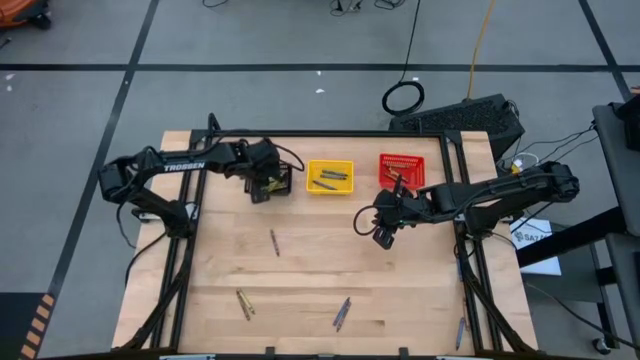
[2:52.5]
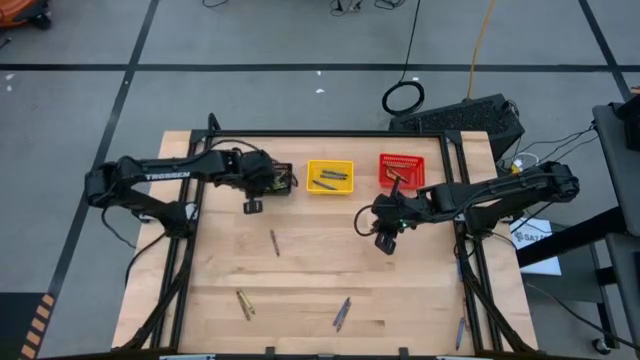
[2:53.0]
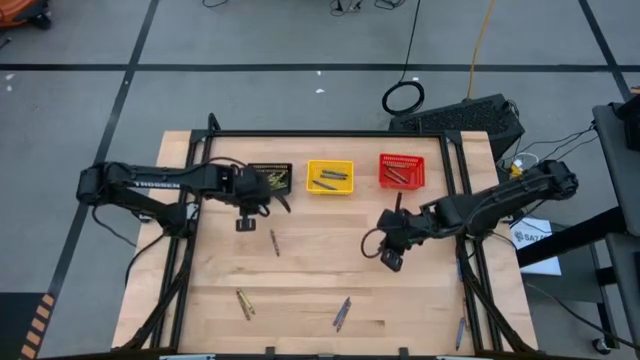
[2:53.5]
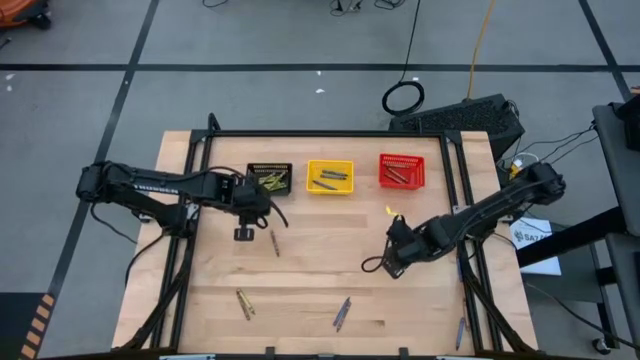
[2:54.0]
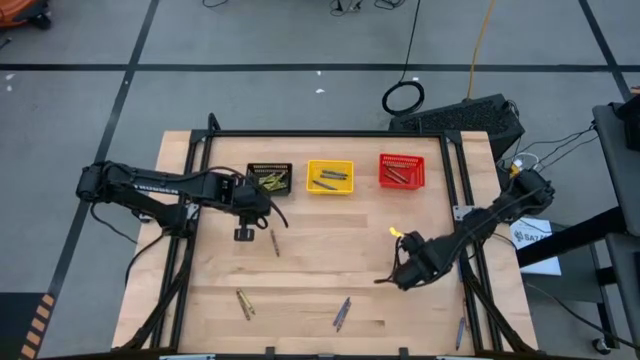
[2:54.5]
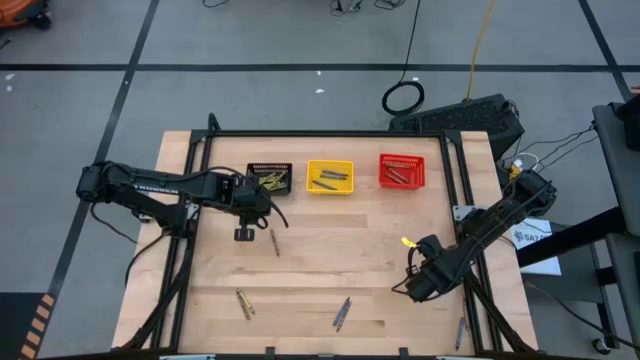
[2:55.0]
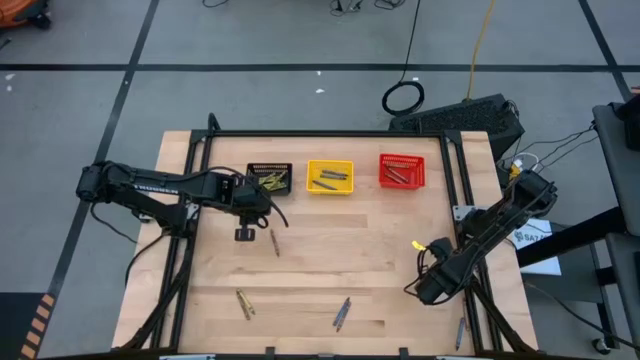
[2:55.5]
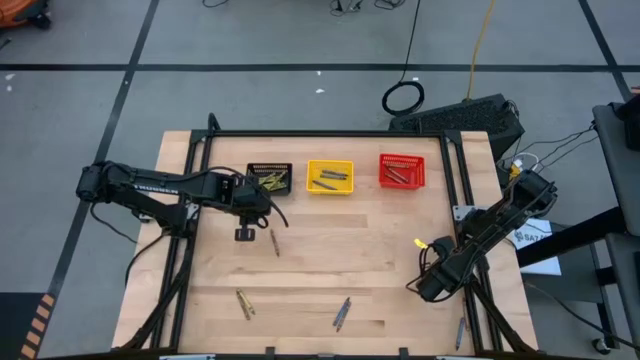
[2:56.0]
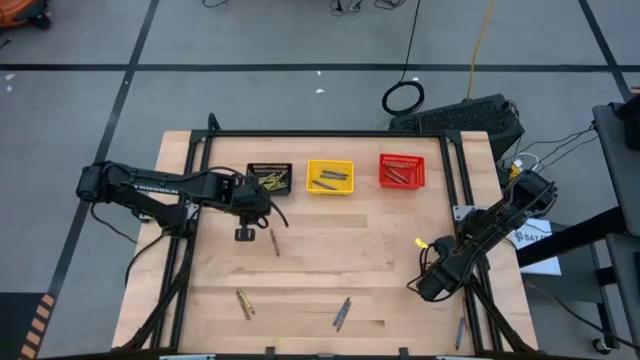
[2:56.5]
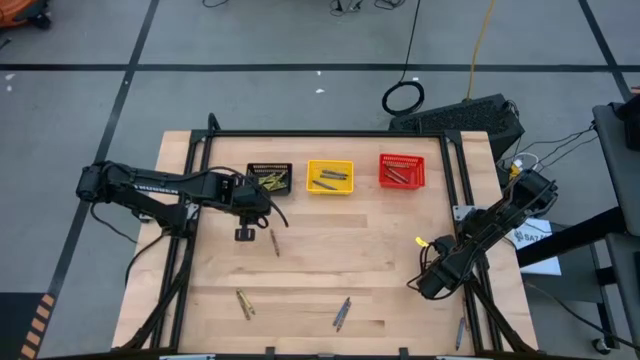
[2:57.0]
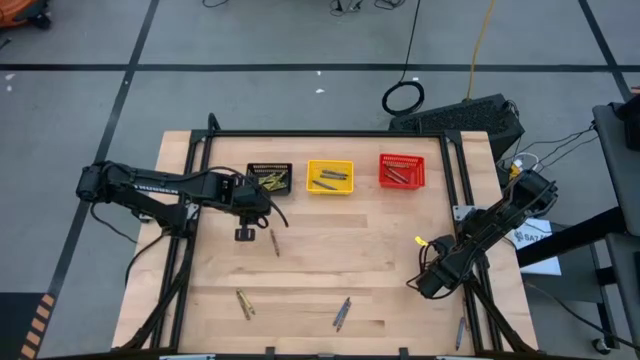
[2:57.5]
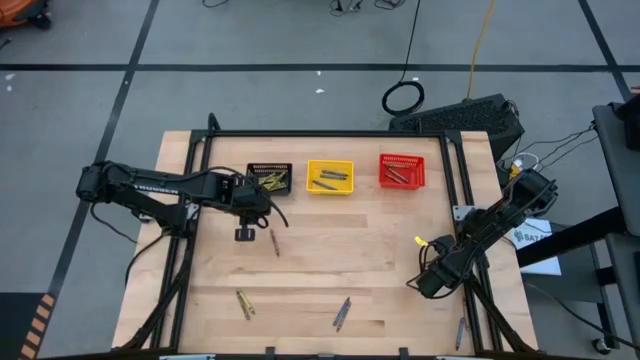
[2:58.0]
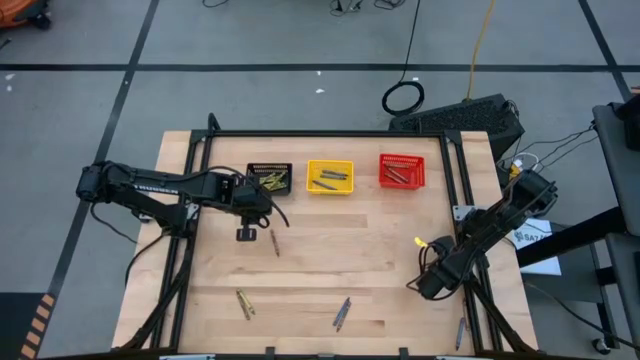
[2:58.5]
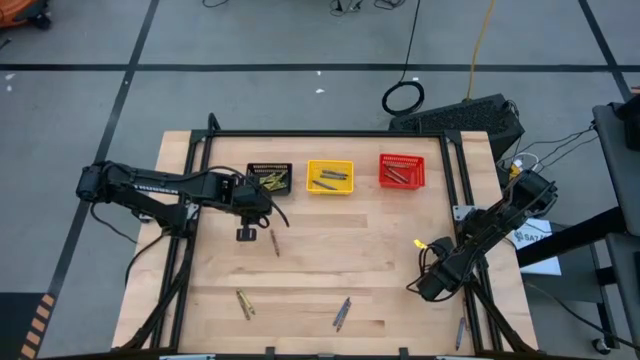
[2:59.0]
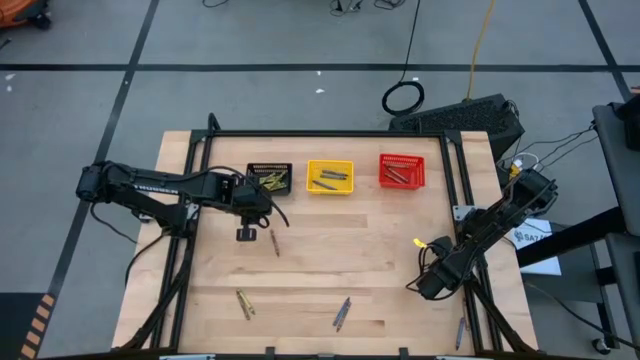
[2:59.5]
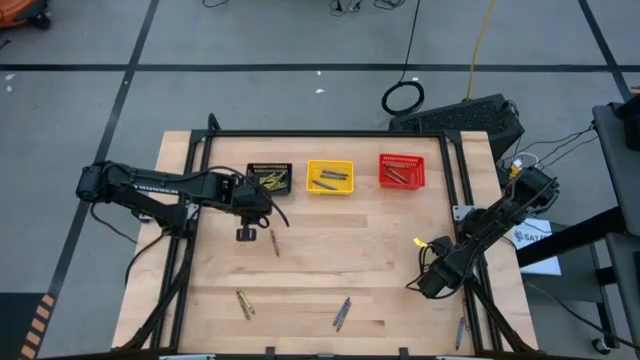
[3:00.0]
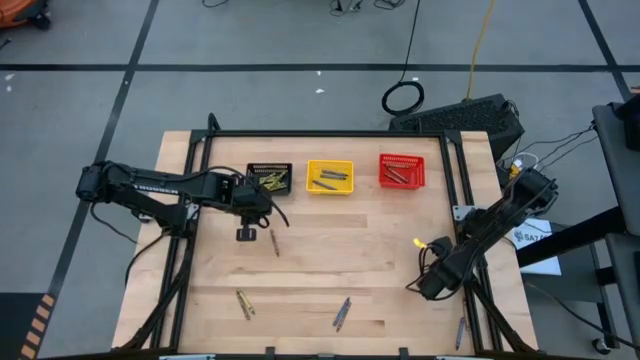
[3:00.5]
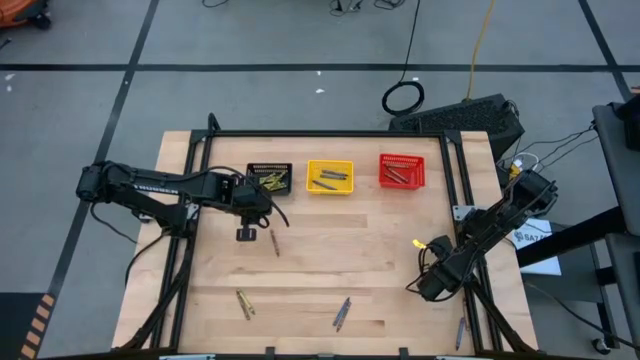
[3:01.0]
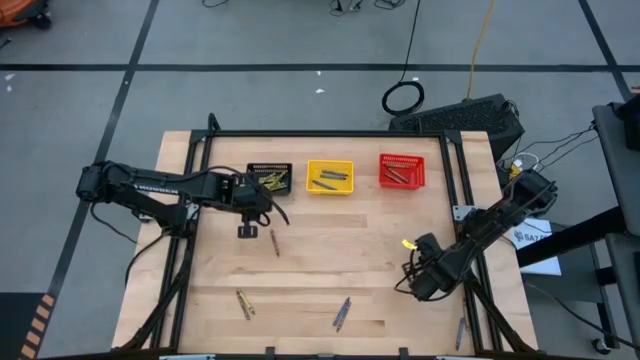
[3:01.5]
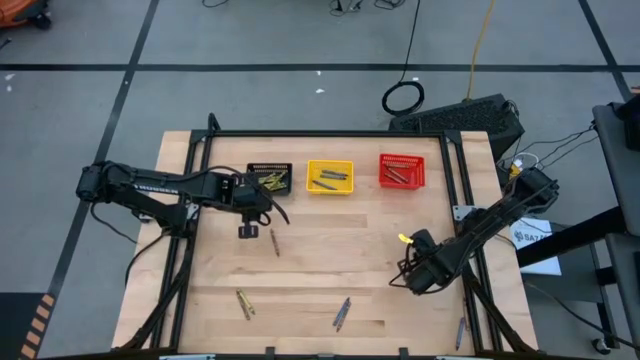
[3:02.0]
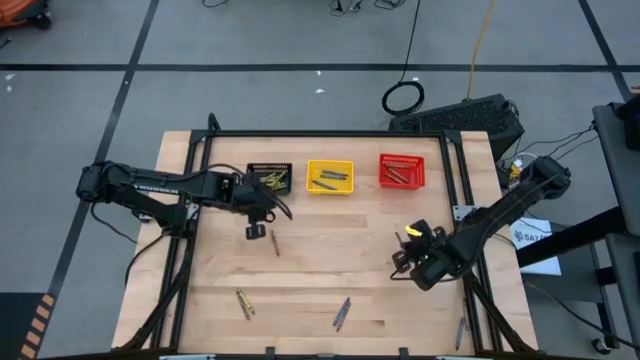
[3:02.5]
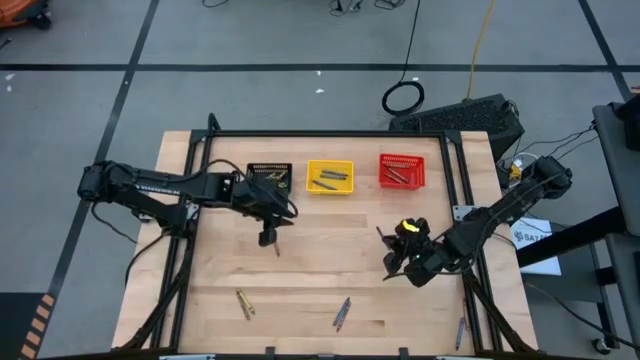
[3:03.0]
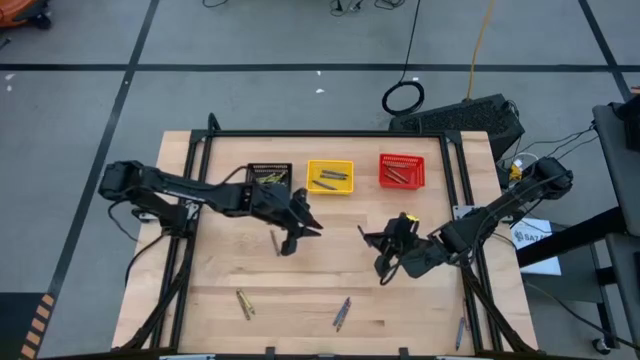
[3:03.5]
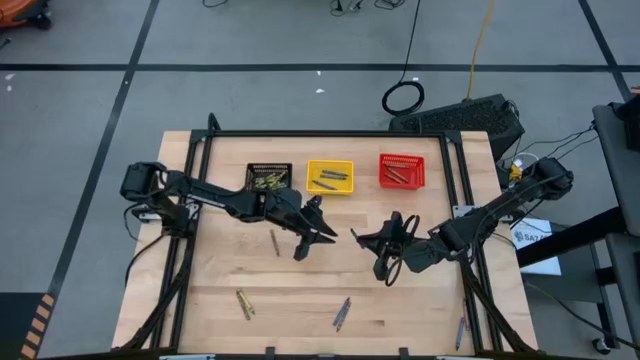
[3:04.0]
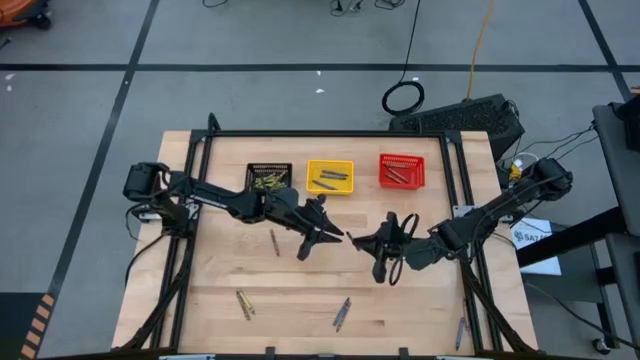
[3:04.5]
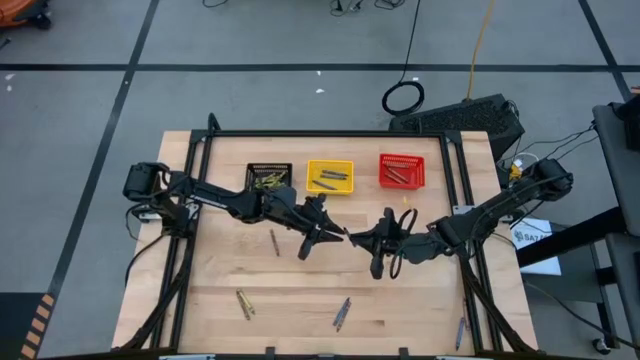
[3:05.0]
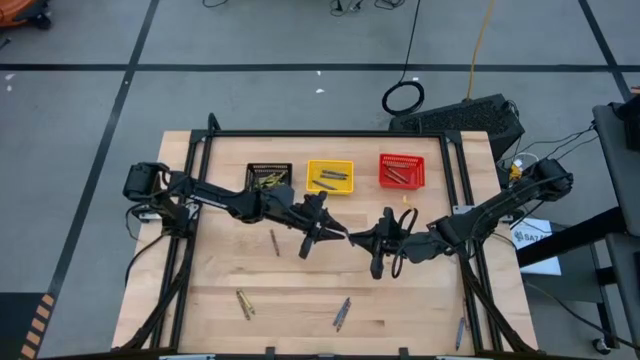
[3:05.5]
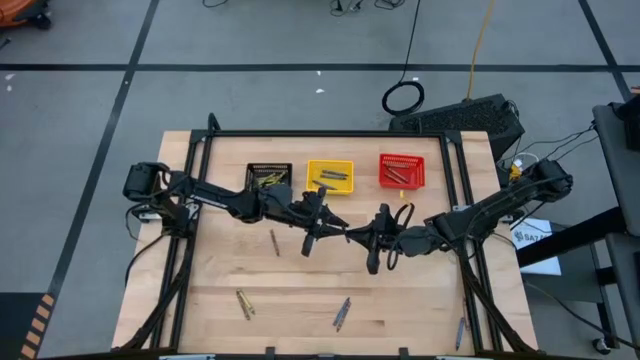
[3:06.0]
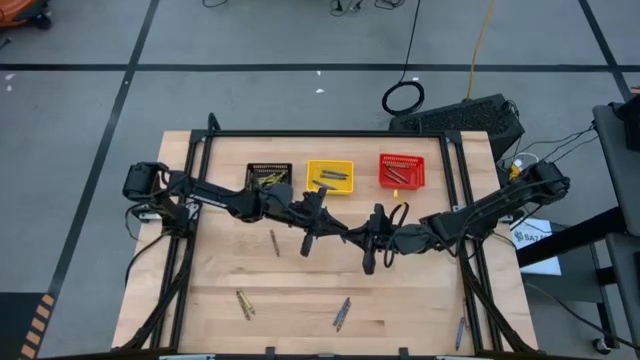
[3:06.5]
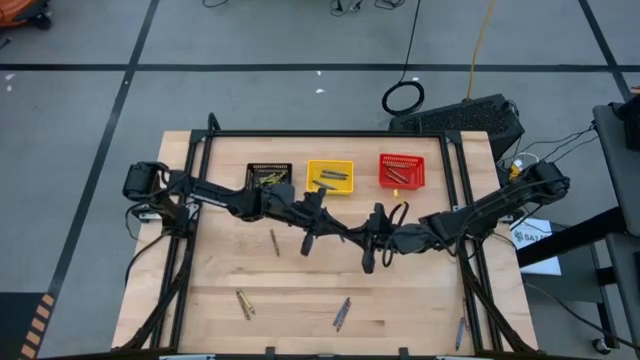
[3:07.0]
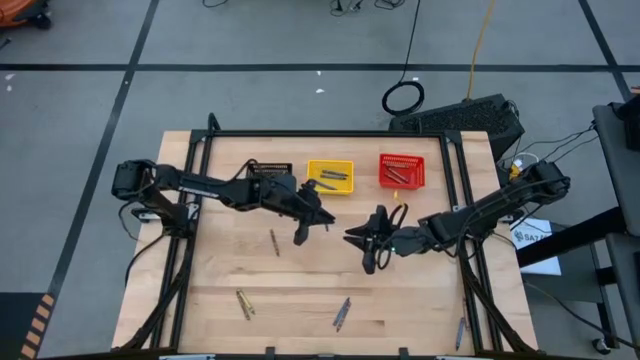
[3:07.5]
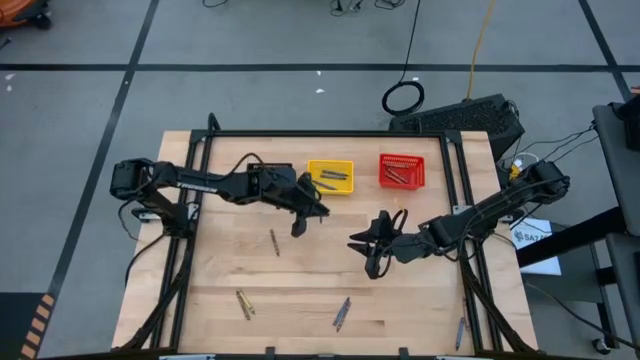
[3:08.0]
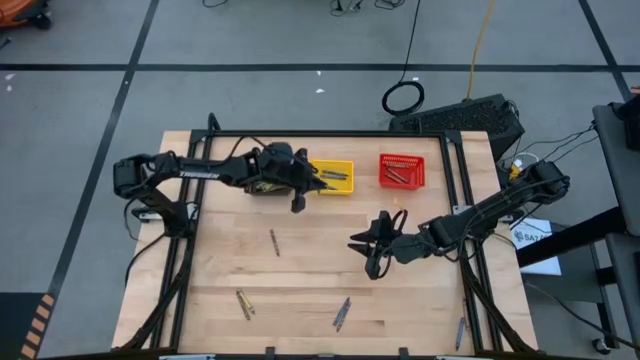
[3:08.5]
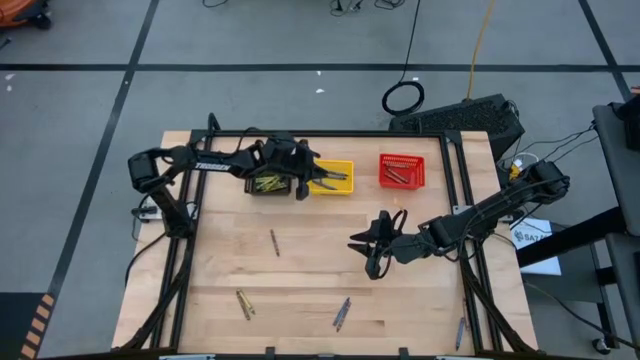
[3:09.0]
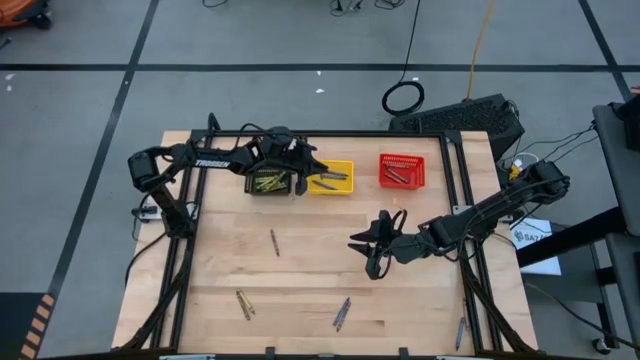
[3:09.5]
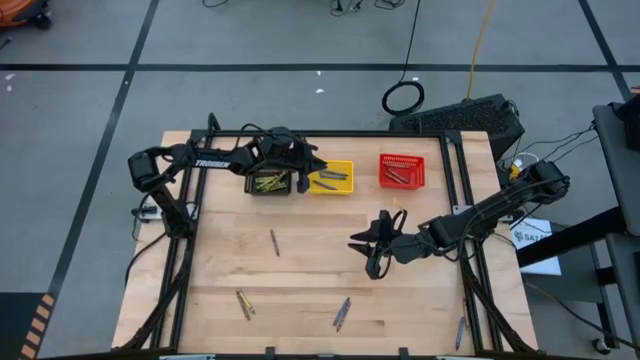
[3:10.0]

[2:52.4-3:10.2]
Task: Sort crayons
Put the blue crayon into the yellow bin

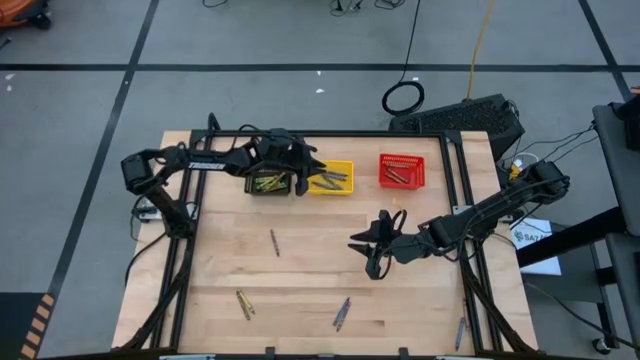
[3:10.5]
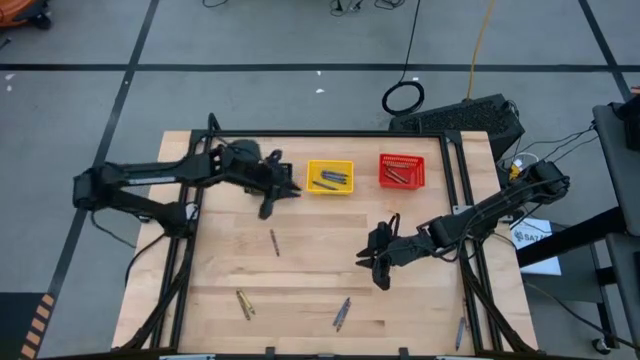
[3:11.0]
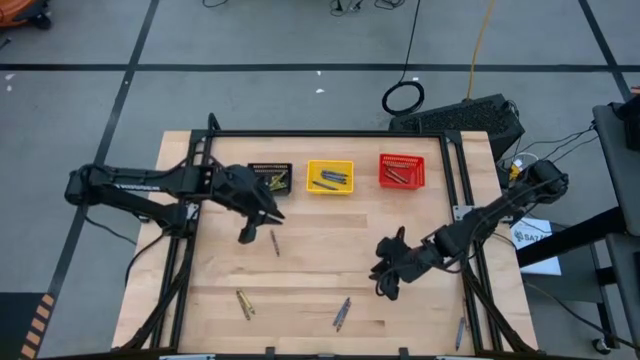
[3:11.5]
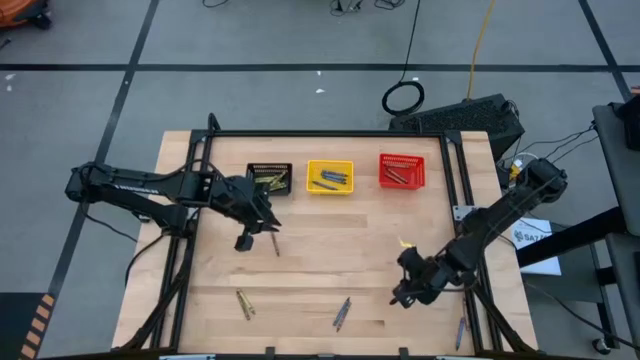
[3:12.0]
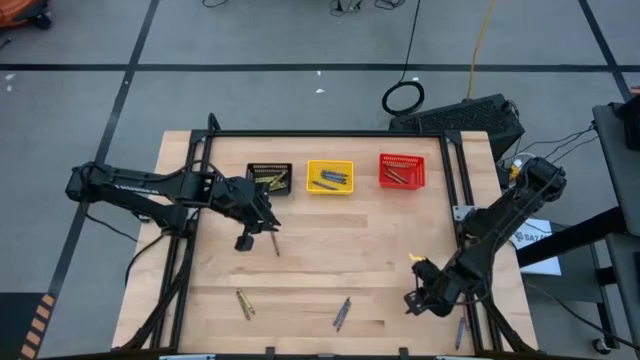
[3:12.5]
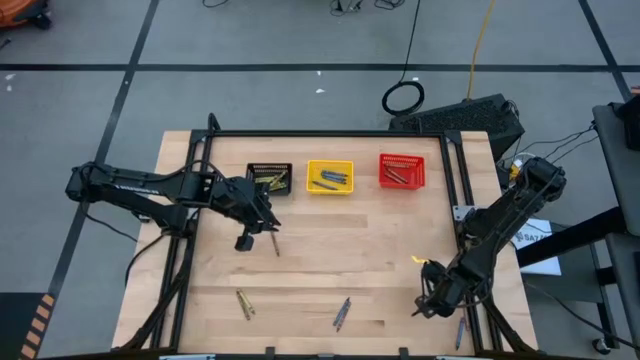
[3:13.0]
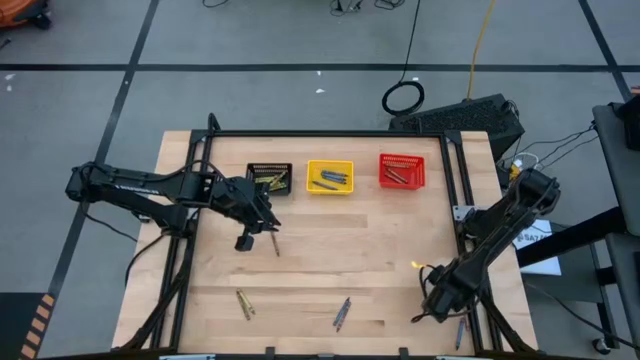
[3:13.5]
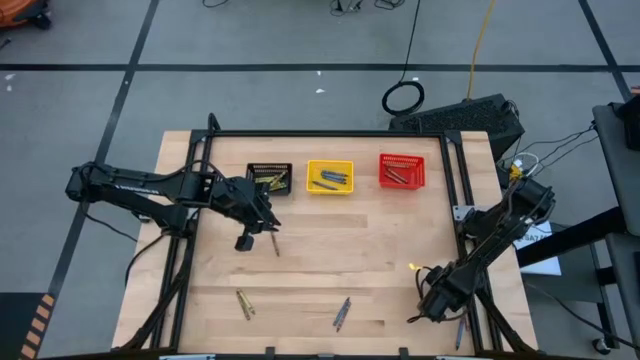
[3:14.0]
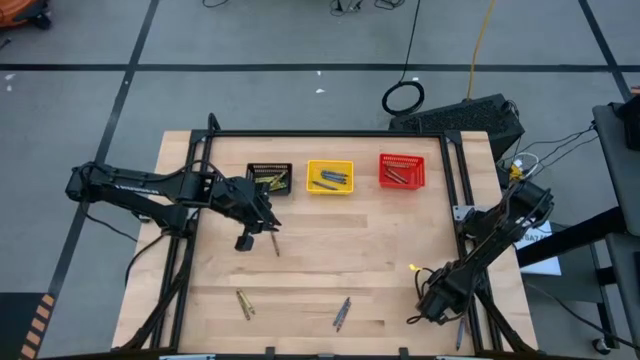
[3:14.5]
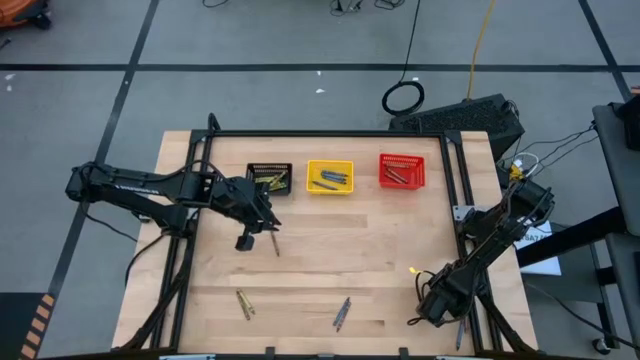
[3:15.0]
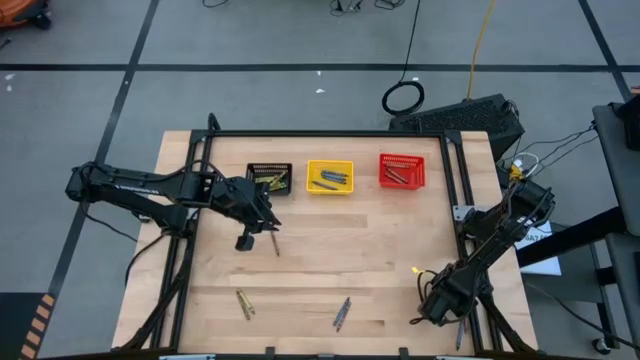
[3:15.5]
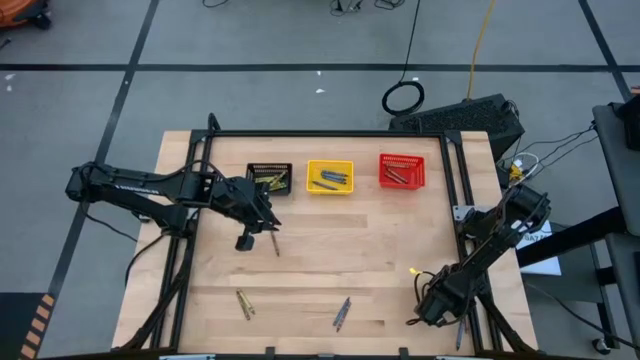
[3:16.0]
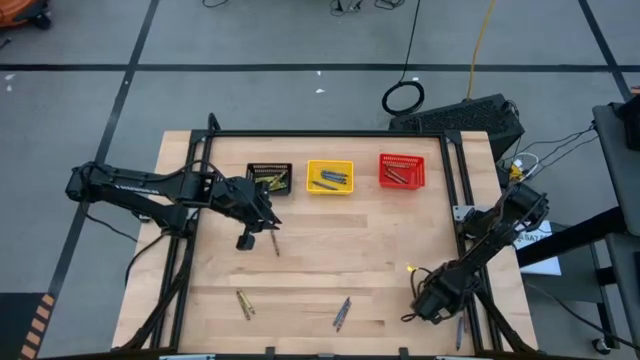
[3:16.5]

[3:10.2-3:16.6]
Put the brown crayon into the red bin
